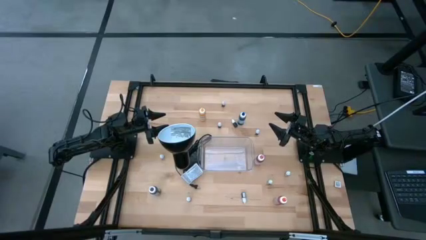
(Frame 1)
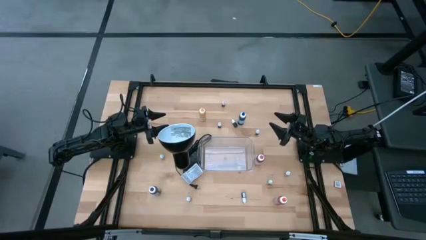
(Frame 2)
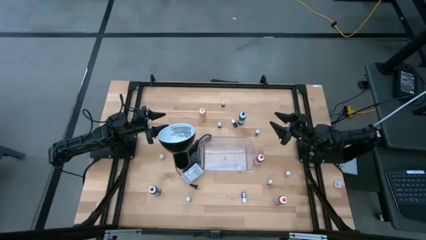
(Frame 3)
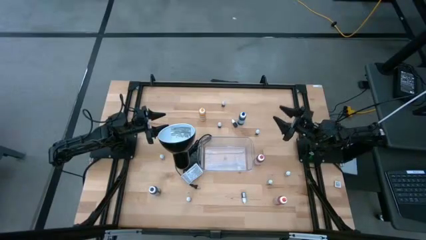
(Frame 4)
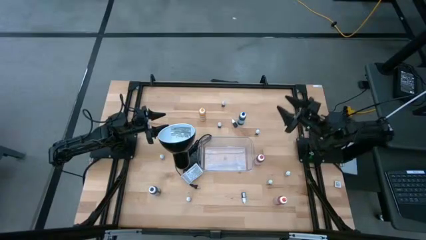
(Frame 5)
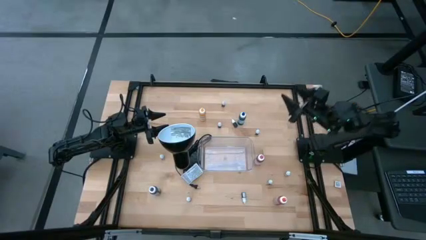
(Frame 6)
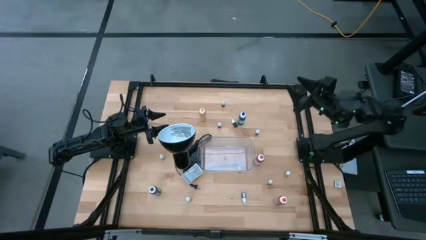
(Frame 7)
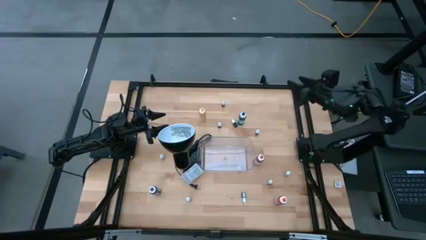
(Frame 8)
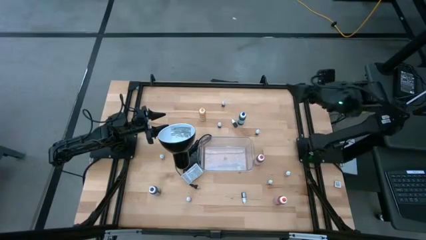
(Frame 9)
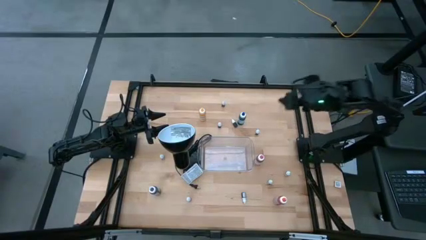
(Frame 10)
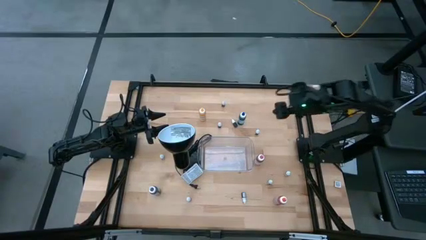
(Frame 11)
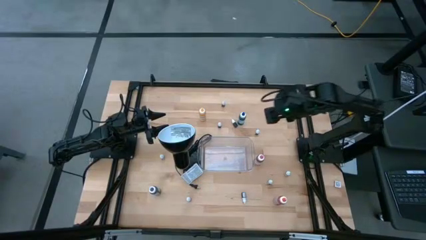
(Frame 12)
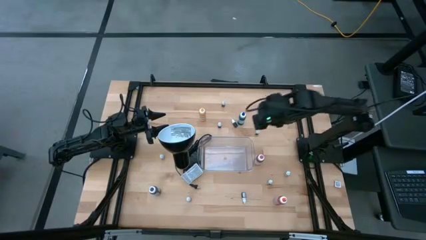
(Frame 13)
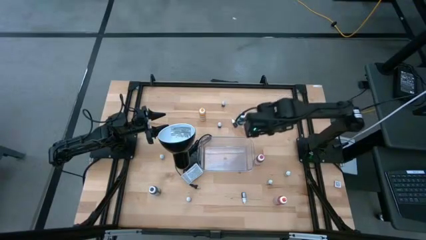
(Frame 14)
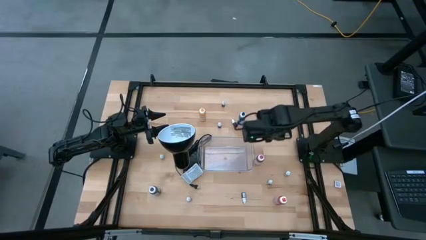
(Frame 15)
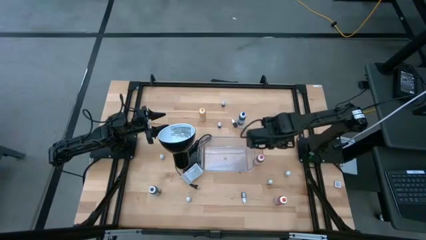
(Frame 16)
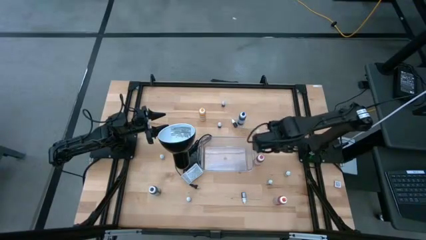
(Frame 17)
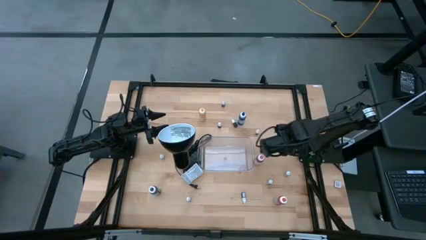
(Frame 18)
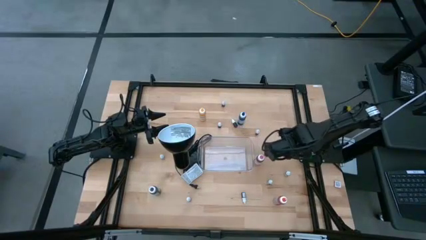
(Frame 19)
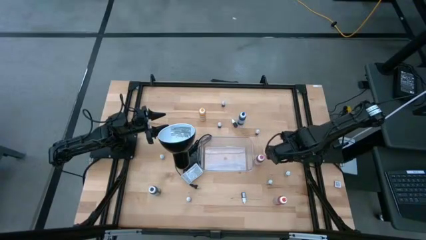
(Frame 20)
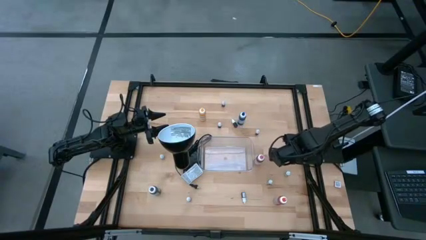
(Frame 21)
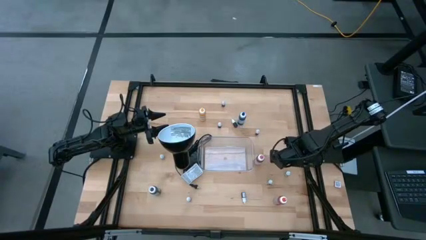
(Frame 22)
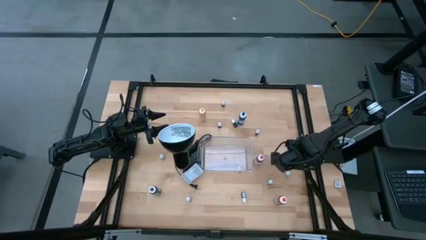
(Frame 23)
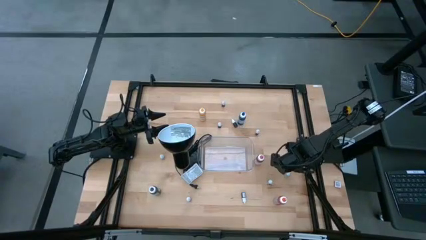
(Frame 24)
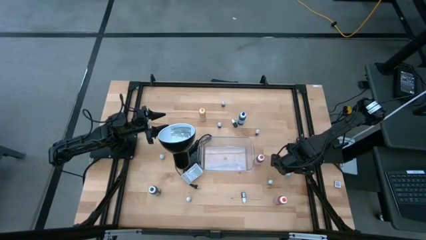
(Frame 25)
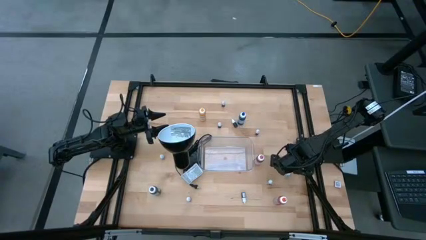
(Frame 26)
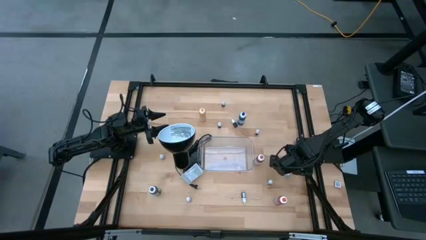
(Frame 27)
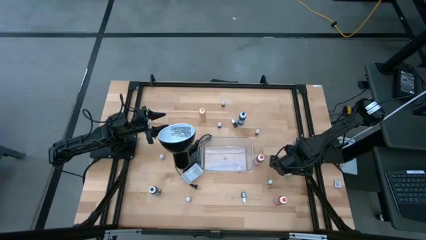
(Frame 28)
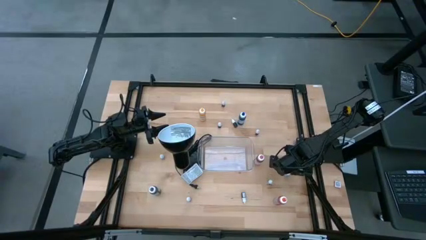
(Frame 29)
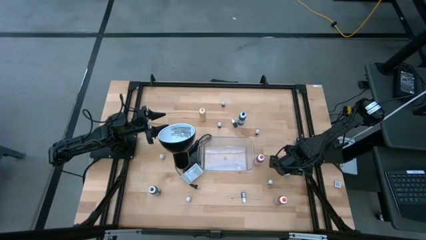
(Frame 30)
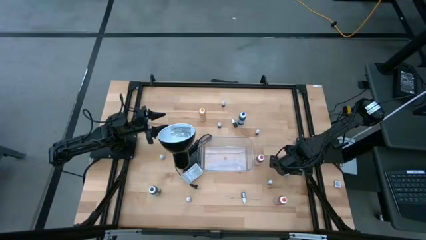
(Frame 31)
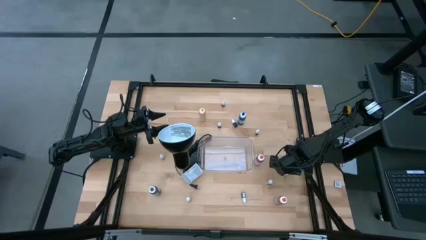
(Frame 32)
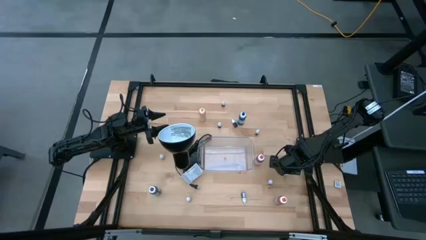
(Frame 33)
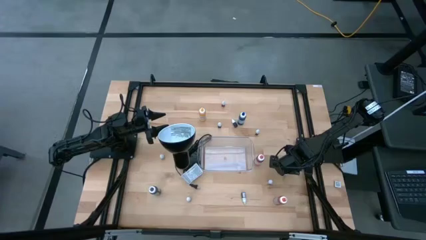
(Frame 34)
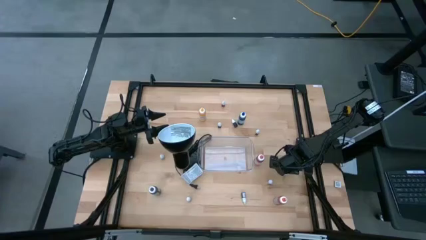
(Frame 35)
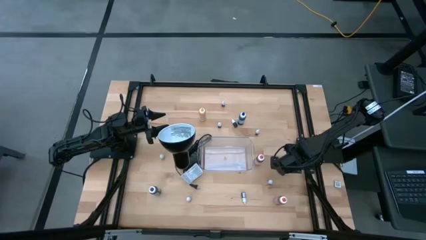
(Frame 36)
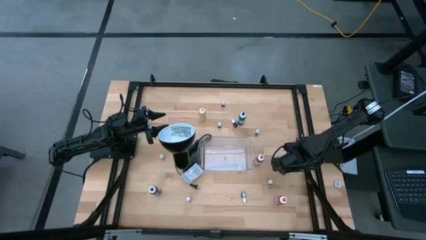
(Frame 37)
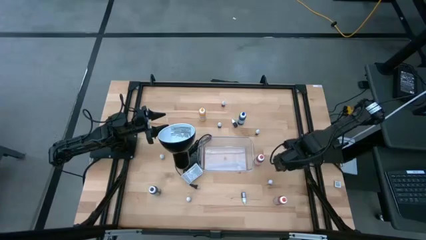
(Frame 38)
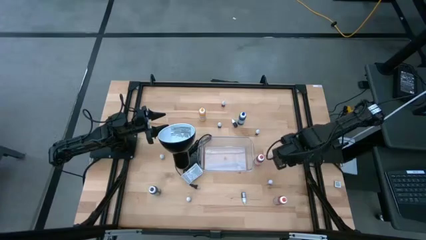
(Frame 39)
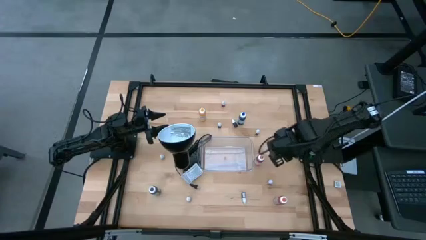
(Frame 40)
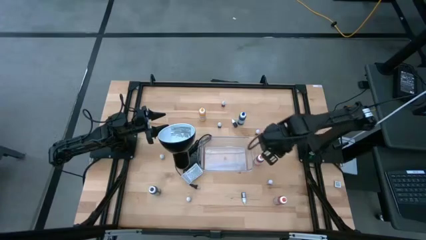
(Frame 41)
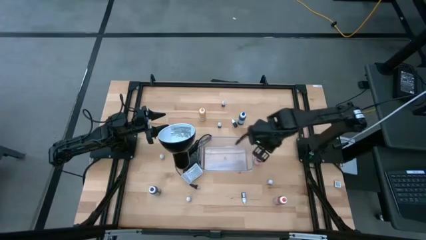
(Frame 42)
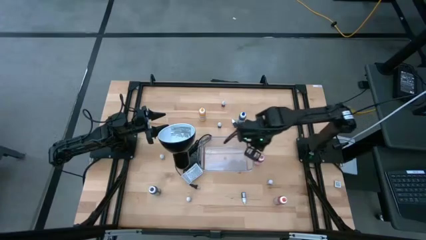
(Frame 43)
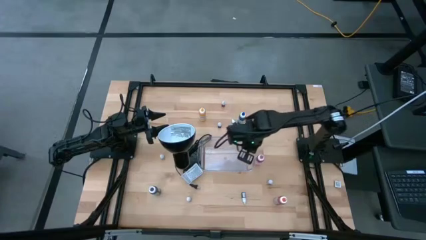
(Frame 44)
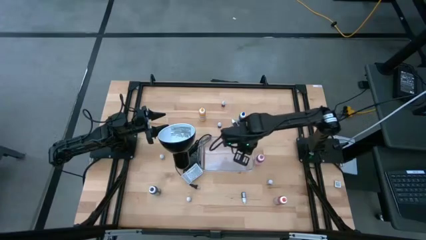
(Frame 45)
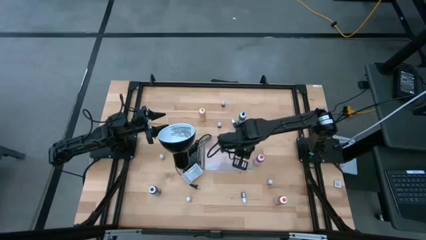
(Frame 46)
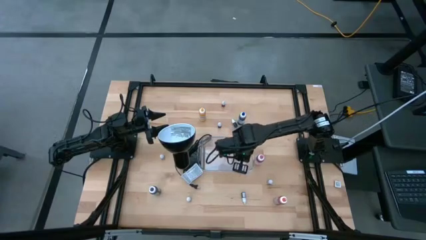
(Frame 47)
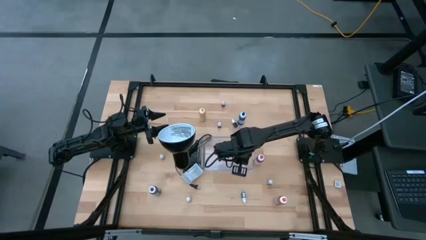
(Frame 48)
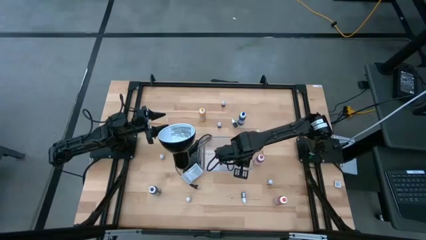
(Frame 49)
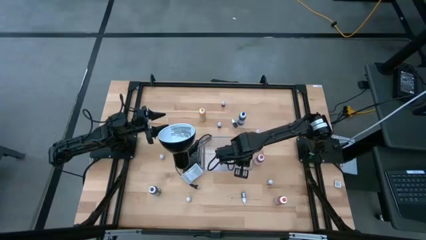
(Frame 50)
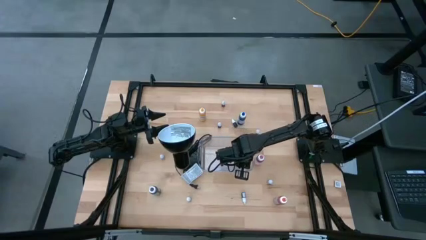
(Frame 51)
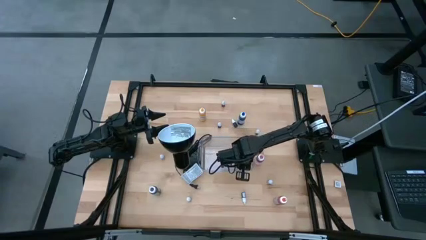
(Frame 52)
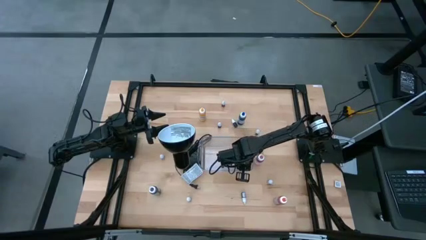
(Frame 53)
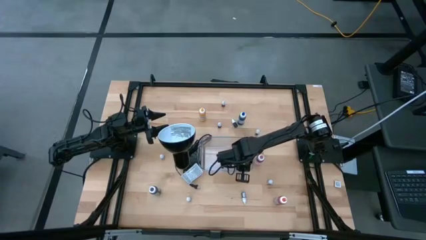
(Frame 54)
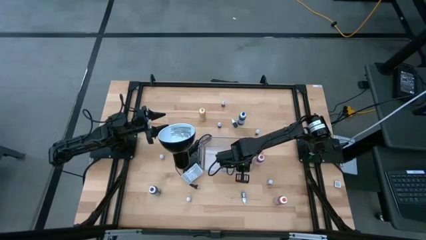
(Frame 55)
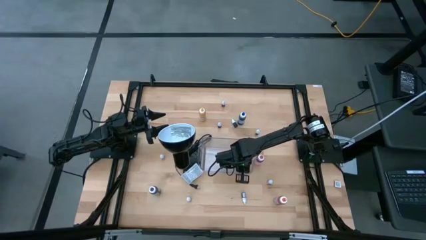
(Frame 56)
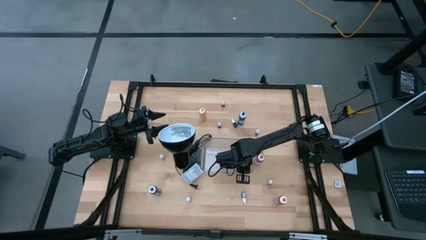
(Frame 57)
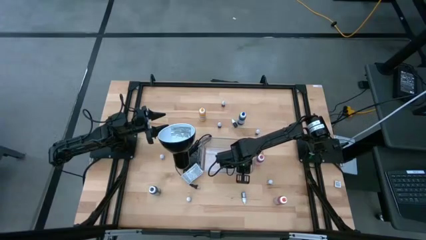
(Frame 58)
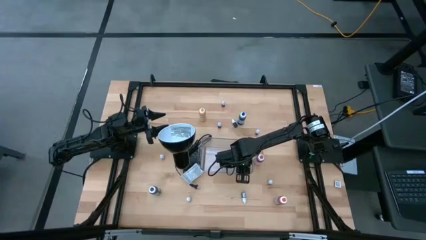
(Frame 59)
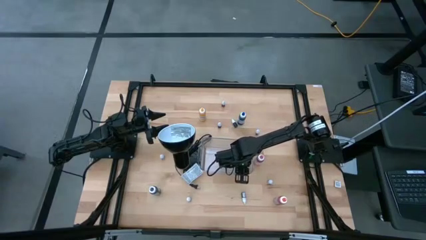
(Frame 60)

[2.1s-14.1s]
Task: Pick & Place food coloring
Put the small green food coloring bottle into the transparent bin
